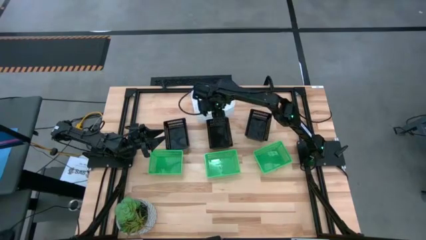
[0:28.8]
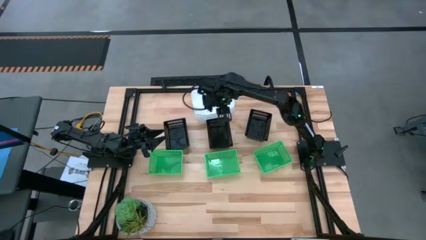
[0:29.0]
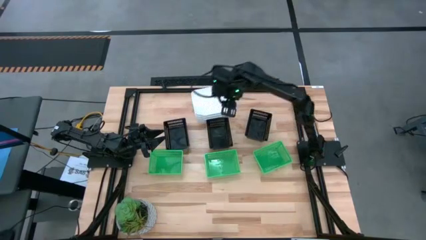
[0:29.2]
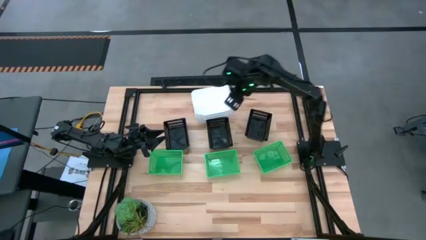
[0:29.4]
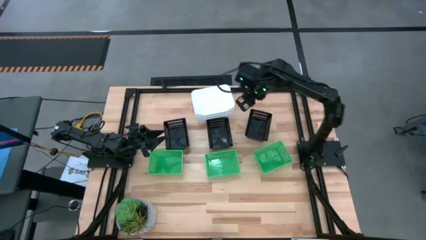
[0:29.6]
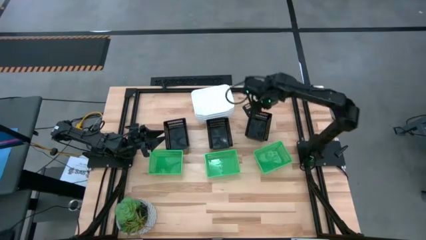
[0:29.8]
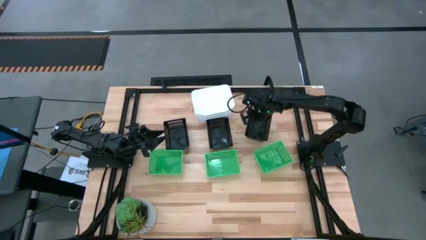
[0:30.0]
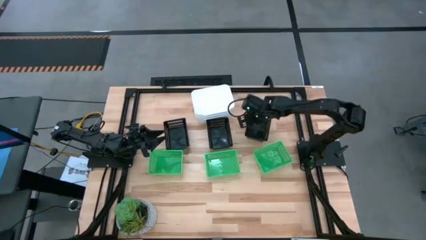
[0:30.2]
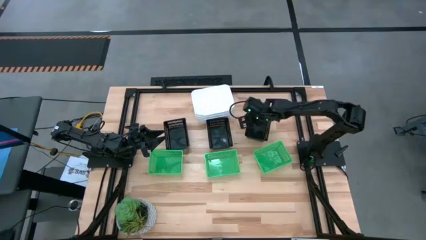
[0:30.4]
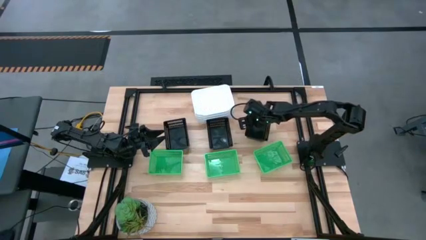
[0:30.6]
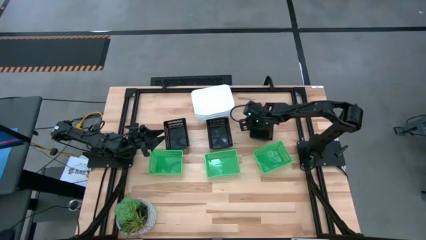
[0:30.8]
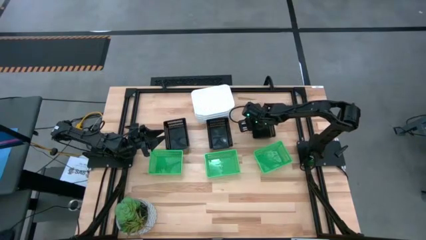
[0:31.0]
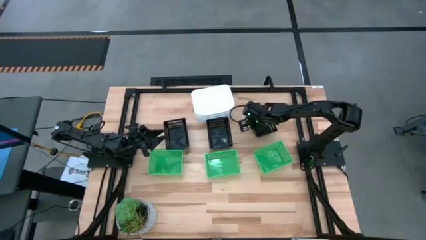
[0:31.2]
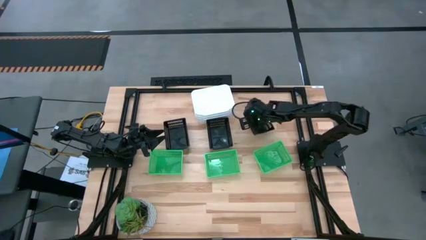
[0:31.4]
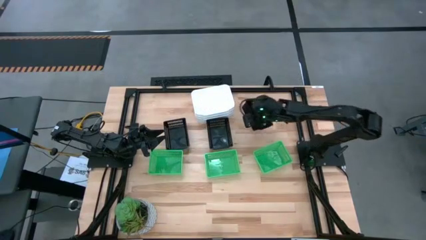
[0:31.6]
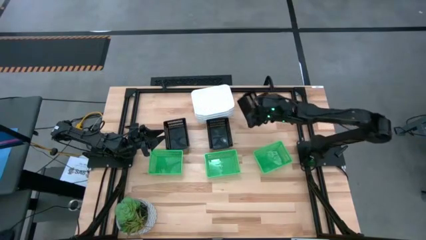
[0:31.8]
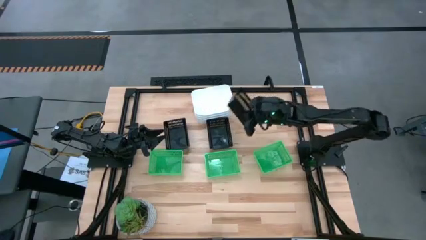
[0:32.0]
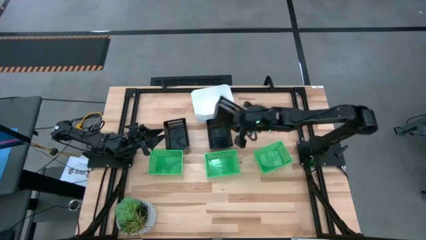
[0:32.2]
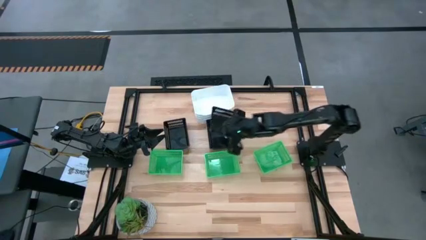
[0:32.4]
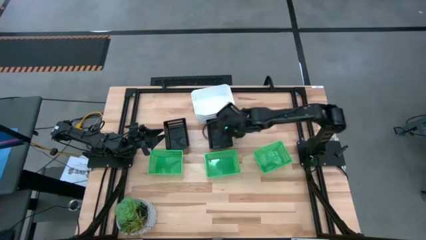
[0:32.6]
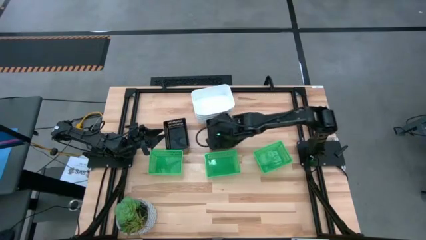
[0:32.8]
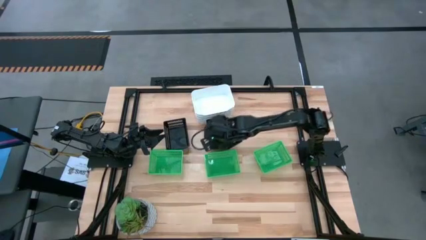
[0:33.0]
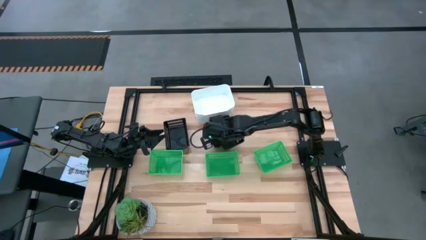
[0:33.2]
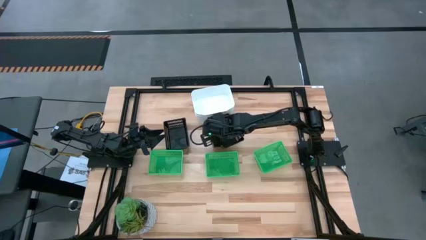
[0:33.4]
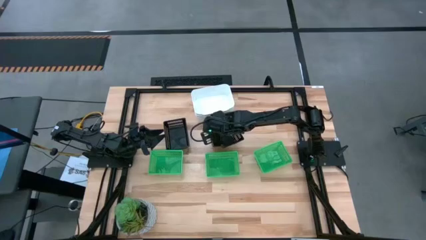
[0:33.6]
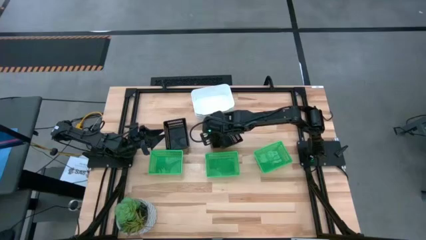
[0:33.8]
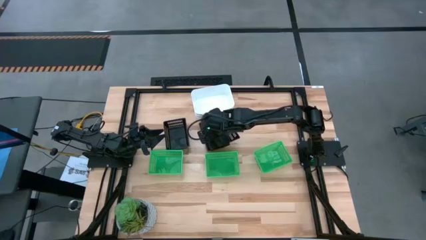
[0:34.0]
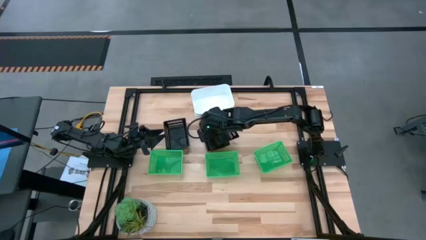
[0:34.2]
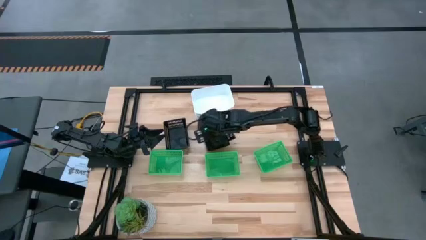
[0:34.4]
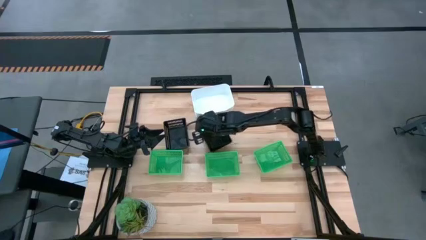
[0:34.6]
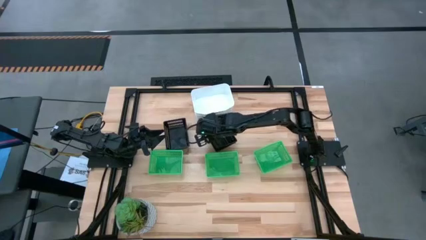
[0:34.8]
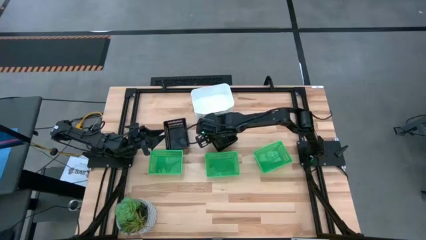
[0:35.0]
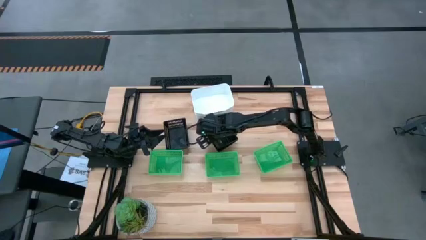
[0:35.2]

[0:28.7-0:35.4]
Stack the right black bin on the middle black bin

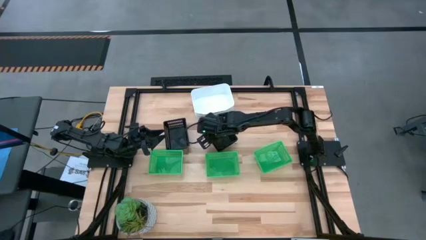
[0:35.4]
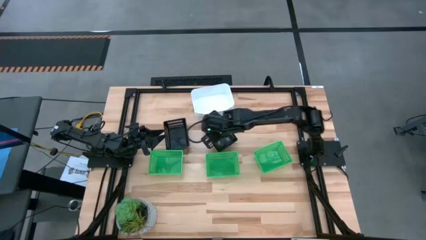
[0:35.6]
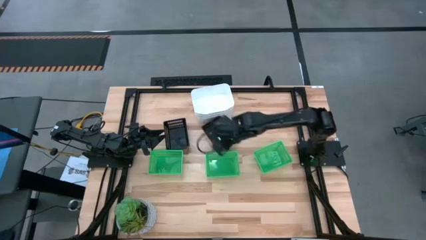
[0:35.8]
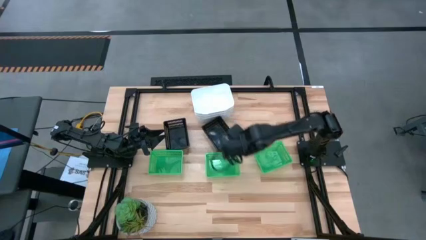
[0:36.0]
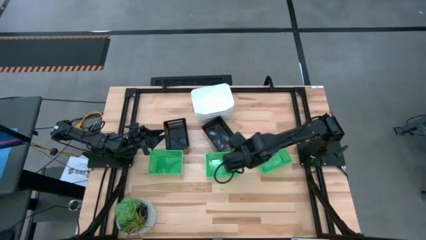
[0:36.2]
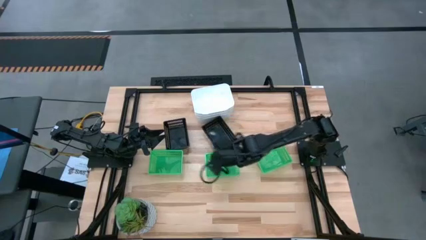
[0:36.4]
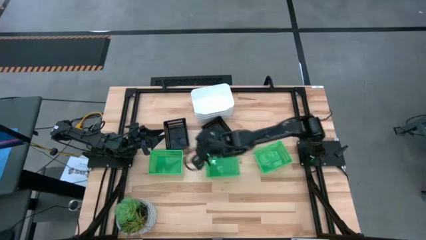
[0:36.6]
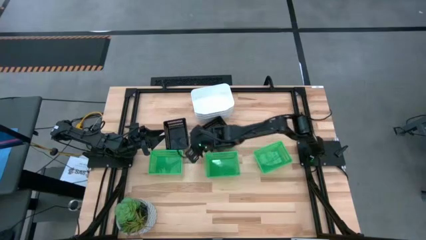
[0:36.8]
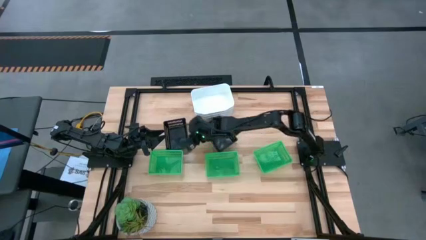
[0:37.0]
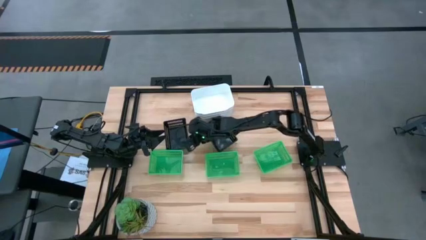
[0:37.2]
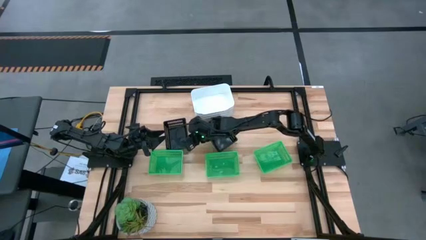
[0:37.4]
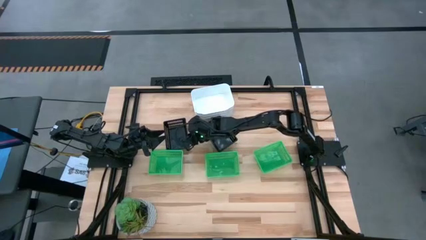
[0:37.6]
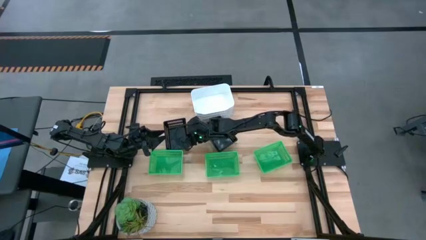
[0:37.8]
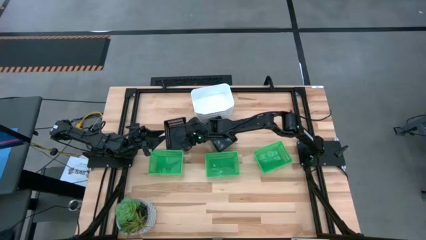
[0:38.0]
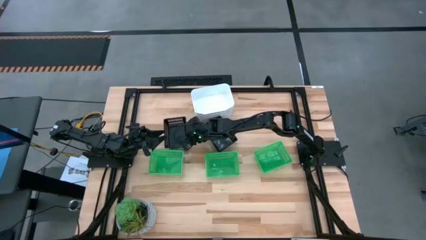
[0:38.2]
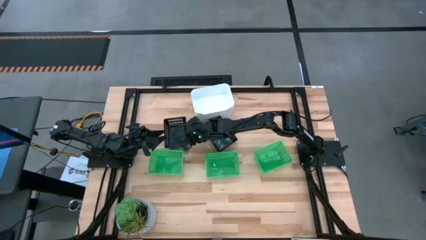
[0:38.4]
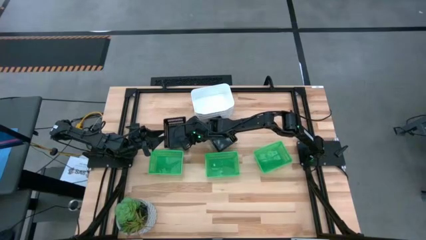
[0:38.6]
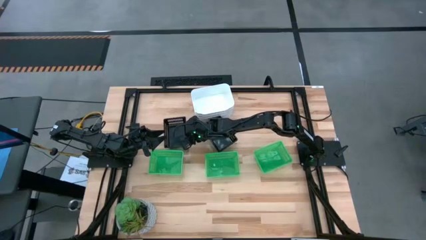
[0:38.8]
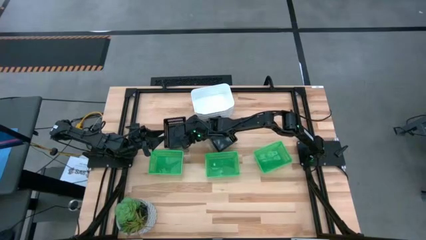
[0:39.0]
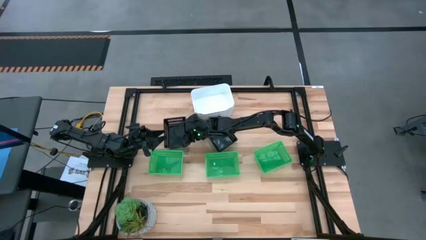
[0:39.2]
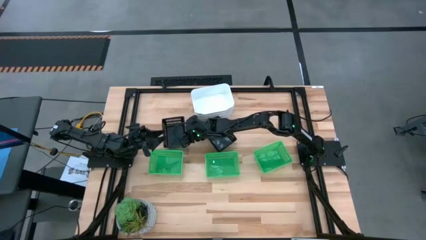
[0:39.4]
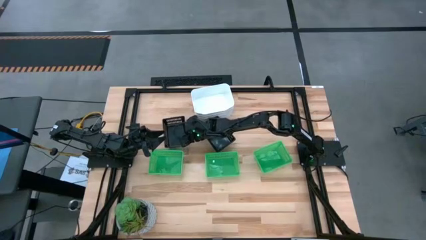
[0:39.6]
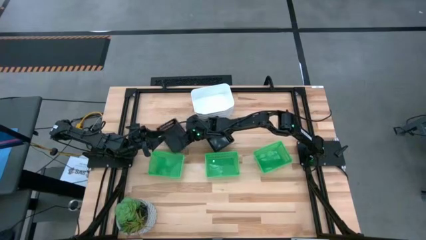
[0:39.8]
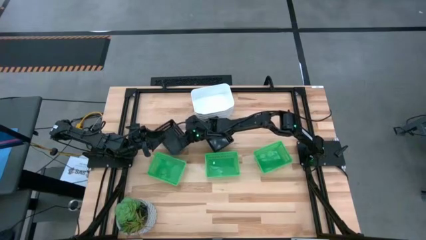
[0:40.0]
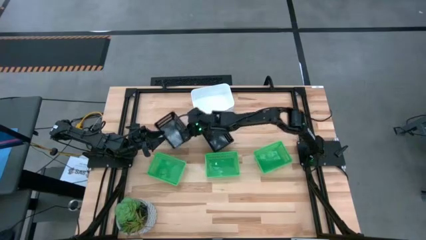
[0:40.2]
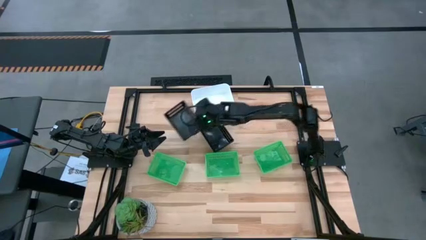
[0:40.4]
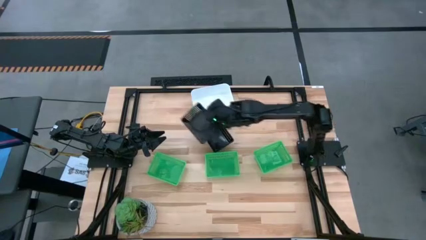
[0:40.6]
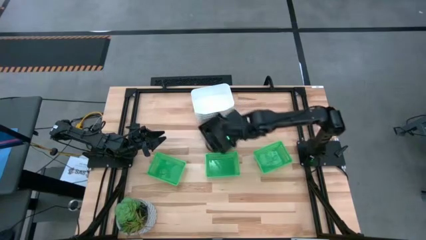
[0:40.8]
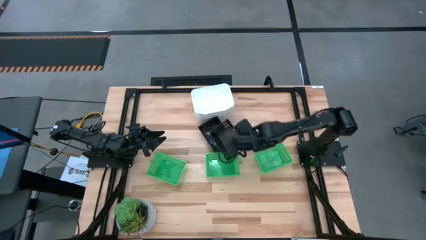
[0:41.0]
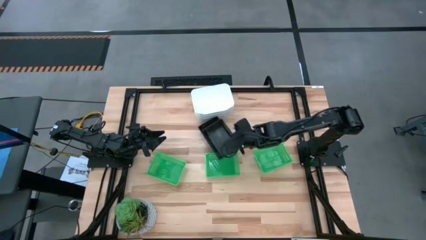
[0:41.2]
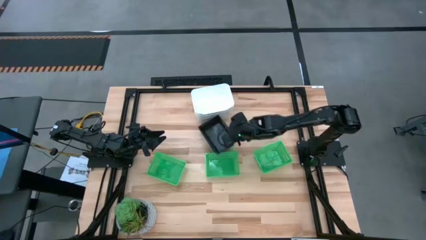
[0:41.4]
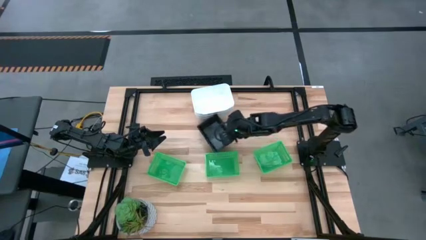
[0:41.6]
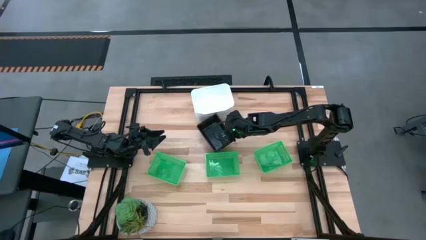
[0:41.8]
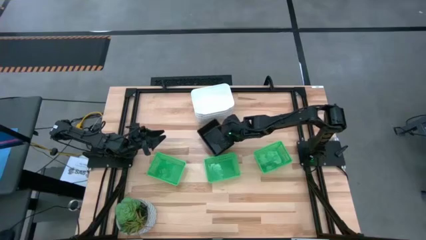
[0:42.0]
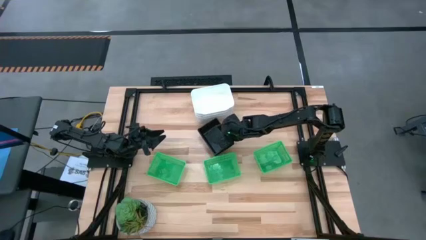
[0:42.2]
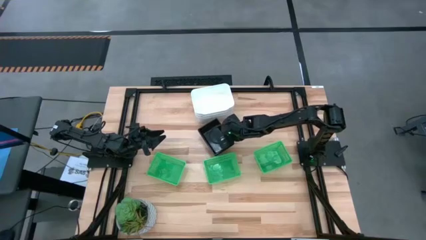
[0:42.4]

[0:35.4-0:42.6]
Stack the left black bin on the right black bin

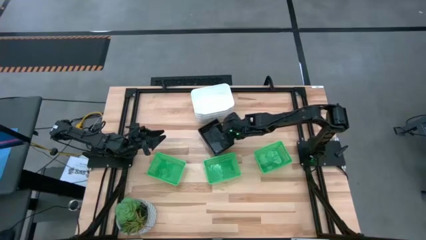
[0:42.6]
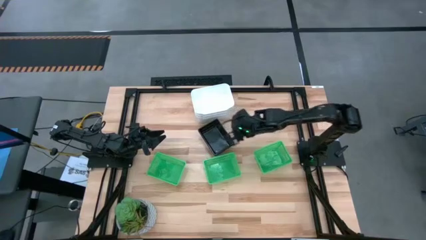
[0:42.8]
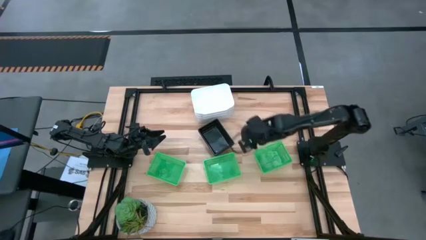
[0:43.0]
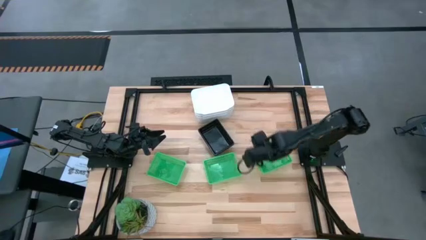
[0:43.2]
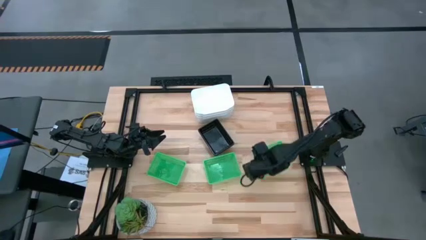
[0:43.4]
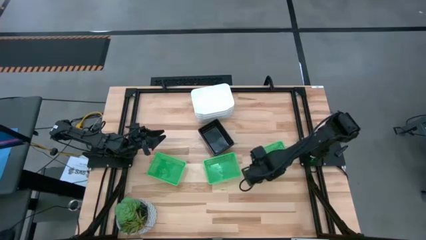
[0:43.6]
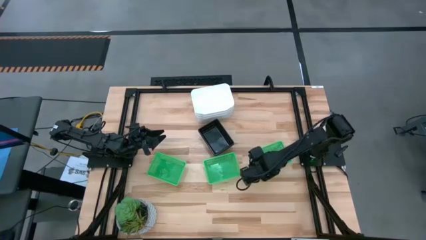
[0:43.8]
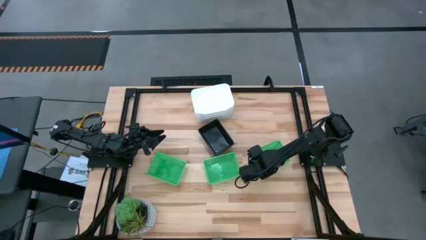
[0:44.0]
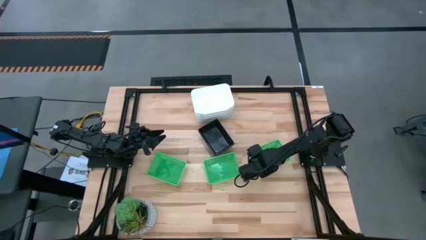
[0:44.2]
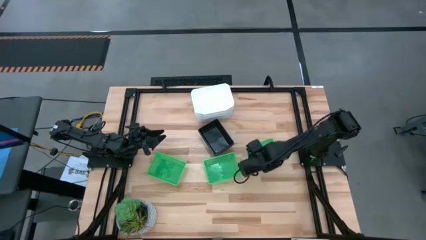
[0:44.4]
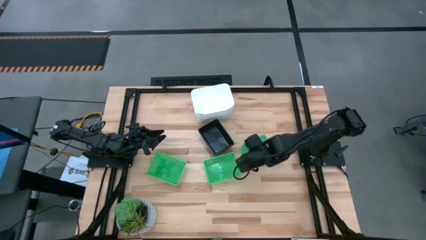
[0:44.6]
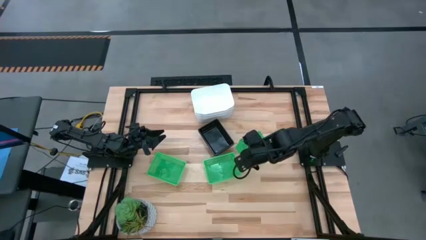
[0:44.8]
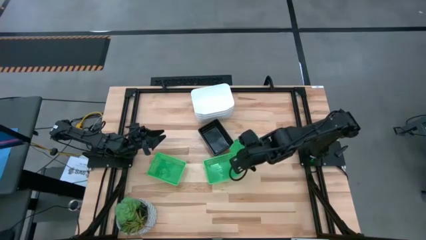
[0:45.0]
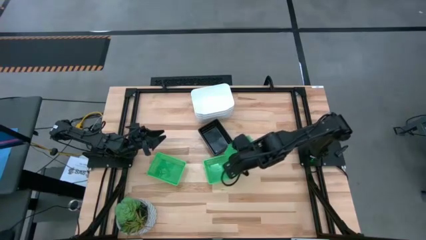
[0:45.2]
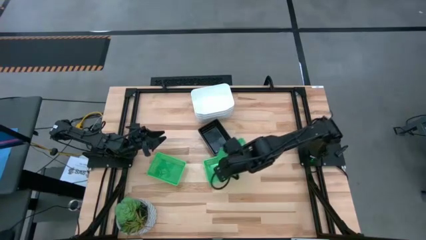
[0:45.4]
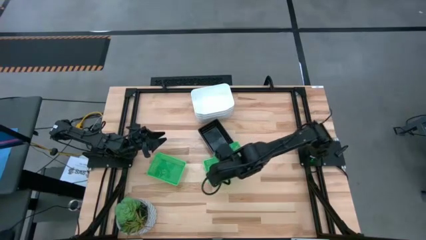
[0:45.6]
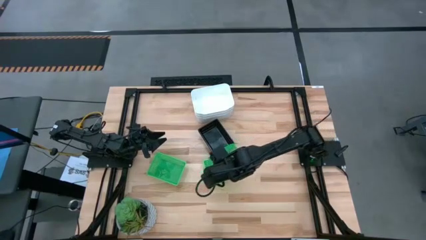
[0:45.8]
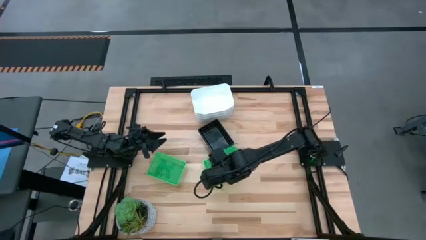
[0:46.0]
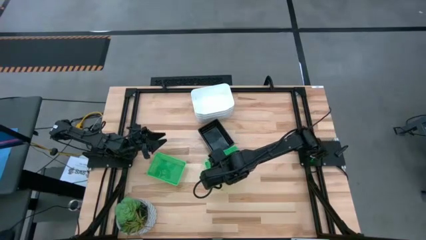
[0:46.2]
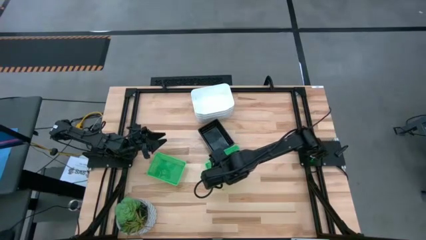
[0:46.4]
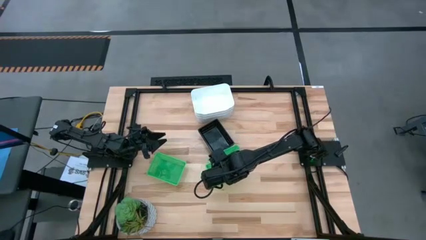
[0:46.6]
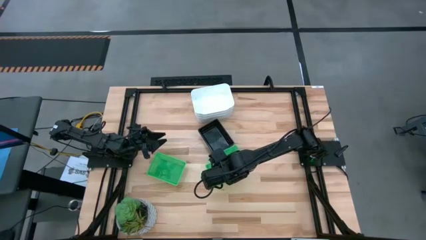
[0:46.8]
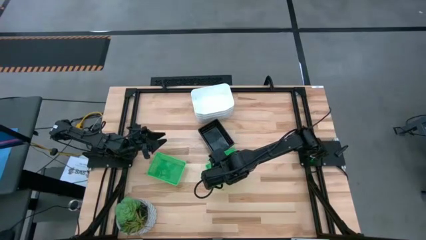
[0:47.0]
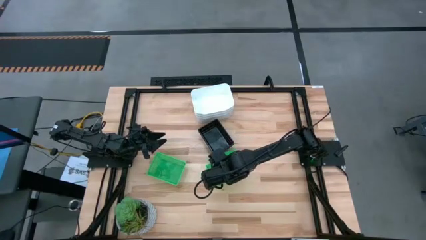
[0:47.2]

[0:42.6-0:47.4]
Stack the right green bin on the middle green bin
